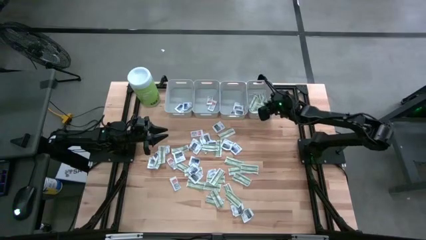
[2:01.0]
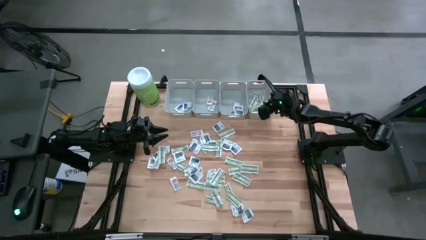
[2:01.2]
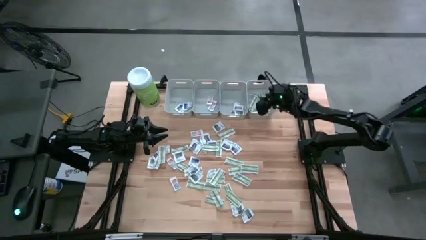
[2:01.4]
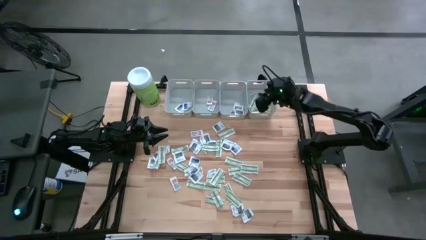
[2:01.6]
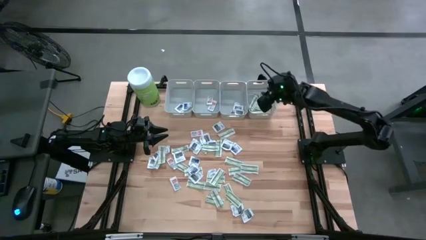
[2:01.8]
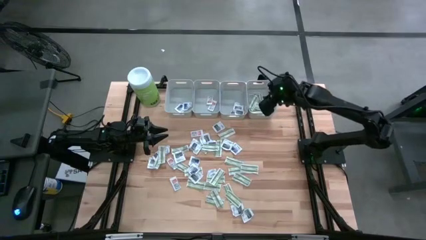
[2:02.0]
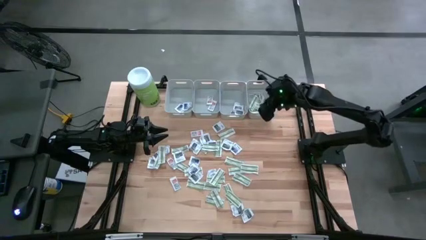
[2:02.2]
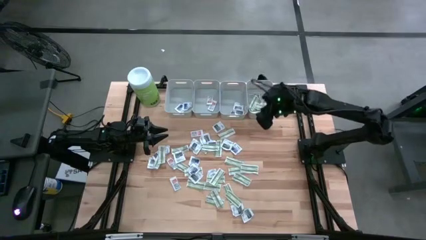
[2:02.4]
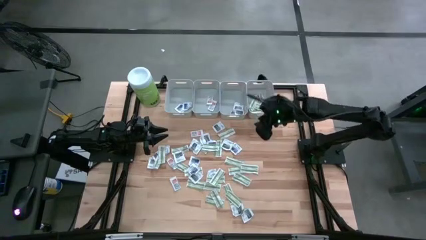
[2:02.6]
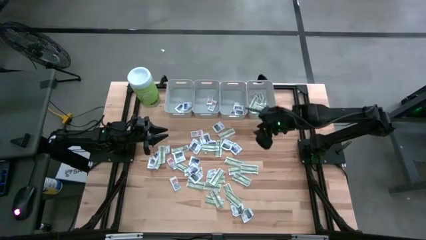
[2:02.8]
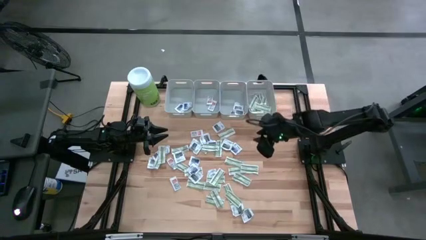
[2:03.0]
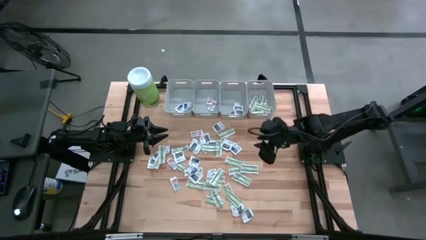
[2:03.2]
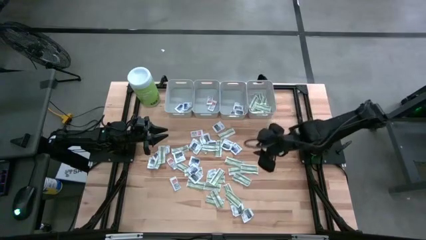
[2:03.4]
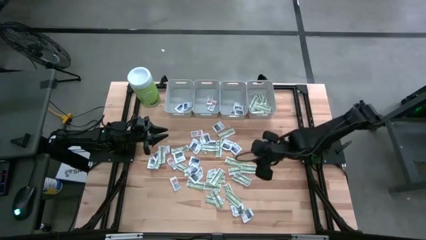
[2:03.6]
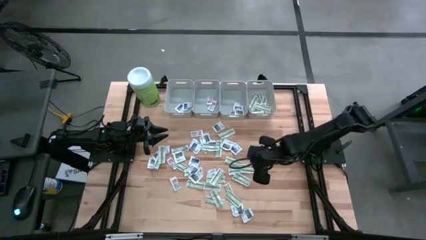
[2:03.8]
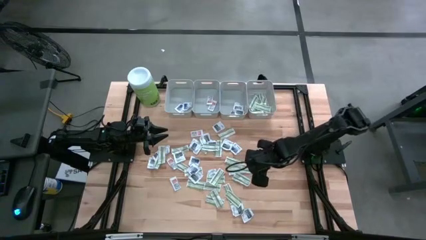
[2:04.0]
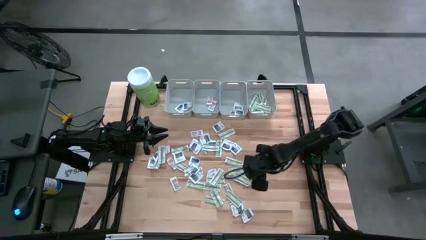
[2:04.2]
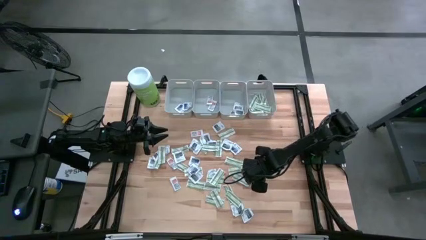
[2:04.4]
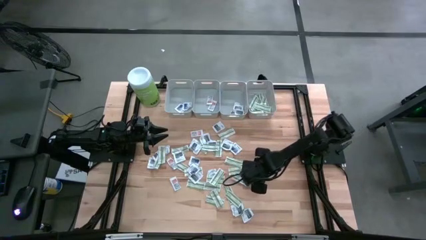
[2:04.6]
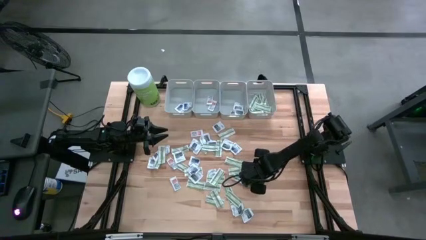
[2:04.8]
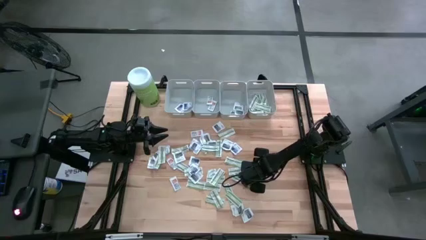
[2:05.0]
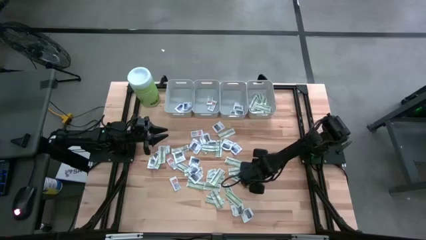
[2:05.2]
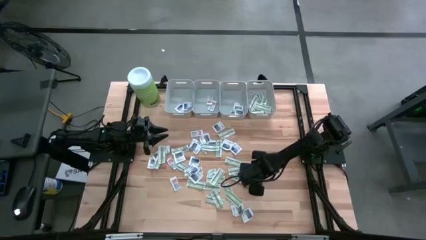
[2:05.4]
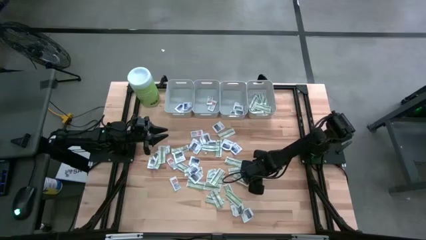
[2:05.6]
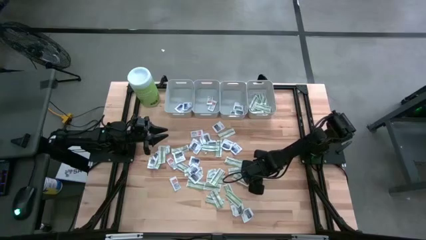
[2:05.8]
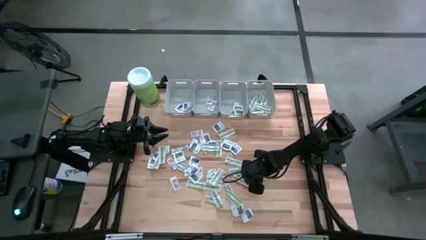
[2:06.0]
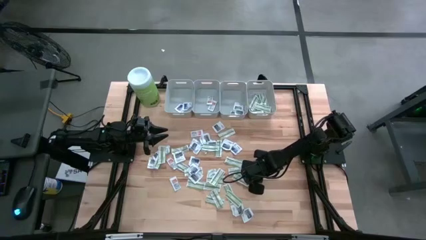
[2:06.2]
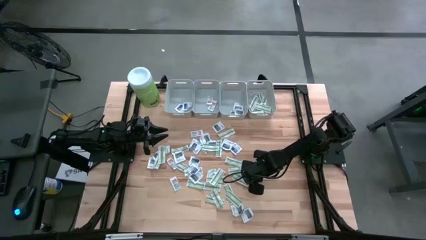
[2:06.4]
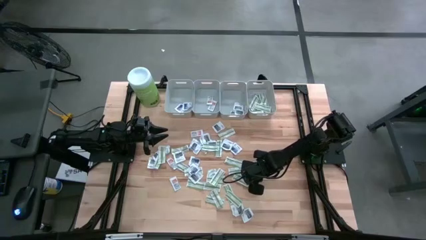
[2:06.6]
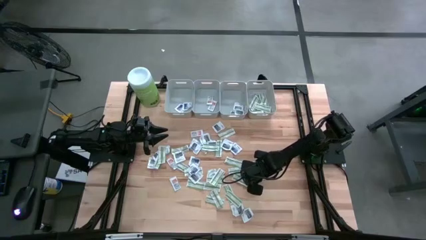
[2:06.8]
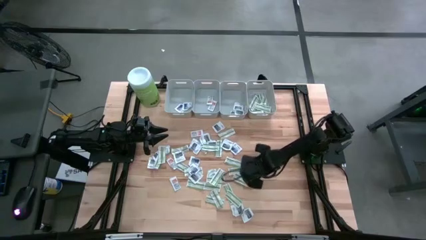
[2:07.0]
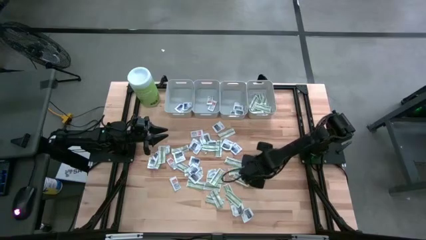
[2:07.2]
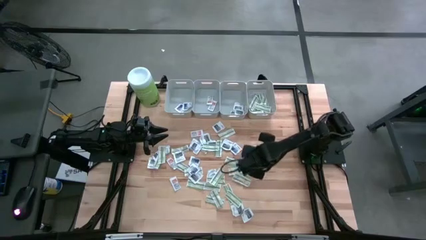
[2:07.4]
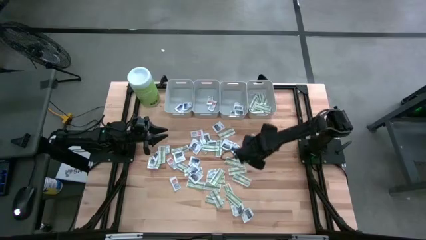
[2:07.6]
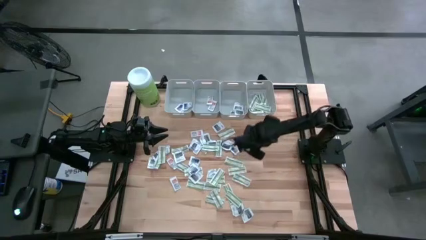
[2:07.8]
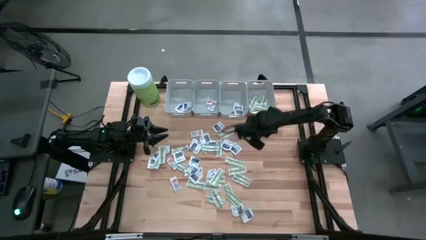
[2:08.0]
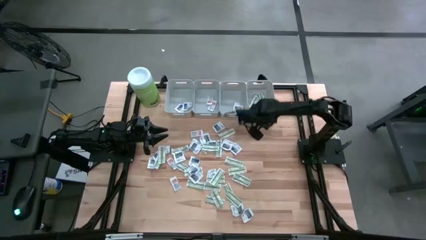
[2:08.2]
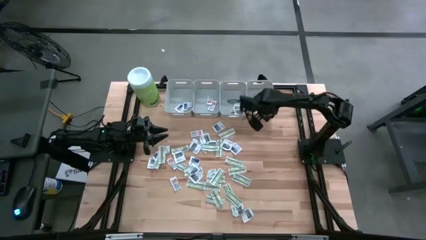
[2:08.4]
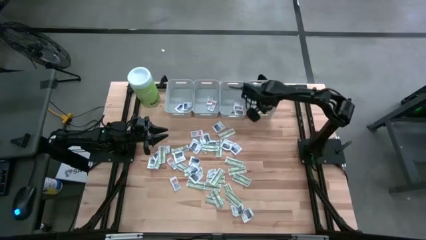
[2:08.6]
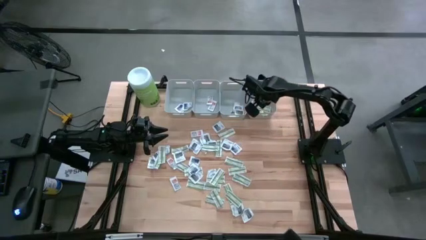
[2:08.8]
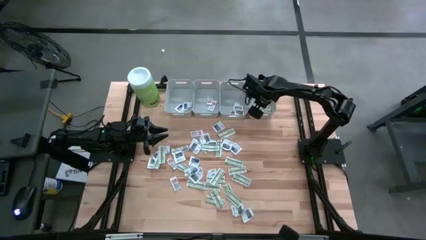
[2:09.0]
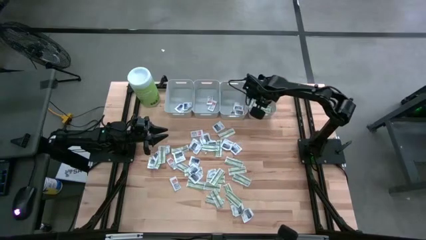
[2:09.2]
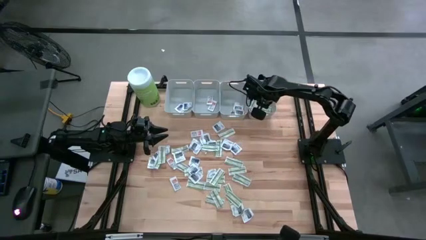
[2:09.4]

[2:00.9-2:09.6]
Task: Pick & Place First Aid Supplies
Put the bandage into the right gray bin

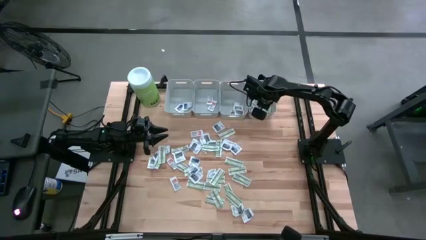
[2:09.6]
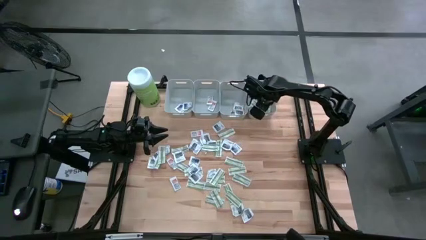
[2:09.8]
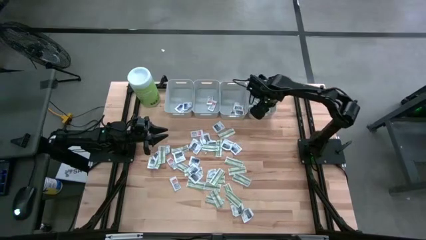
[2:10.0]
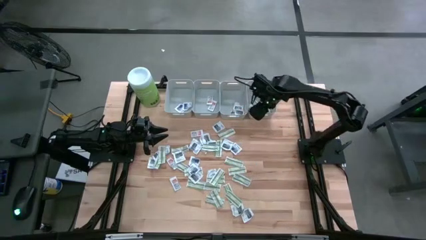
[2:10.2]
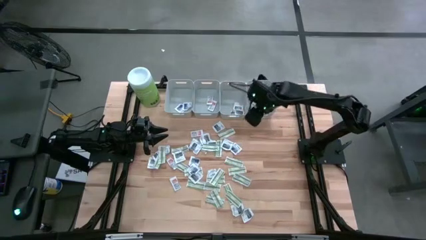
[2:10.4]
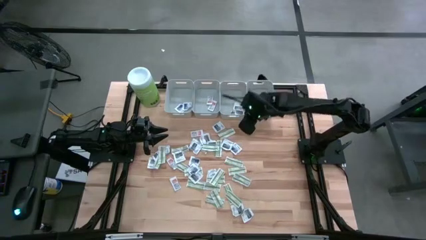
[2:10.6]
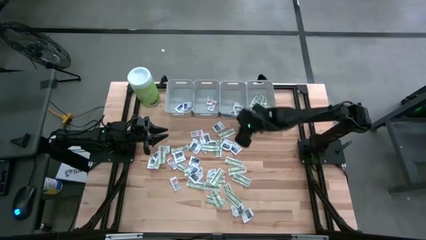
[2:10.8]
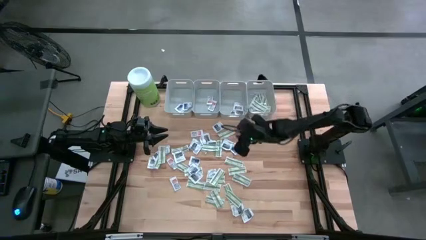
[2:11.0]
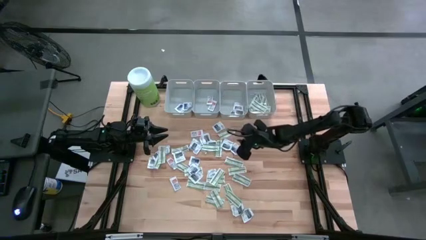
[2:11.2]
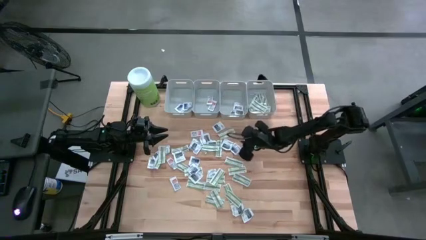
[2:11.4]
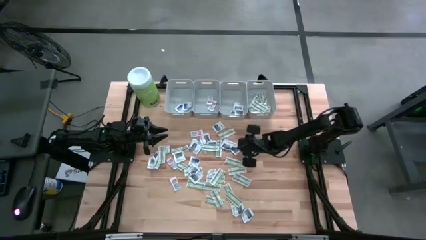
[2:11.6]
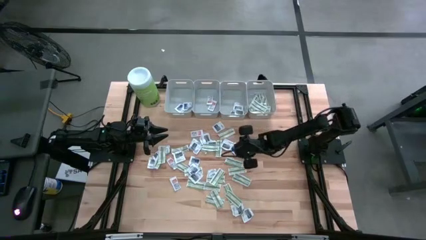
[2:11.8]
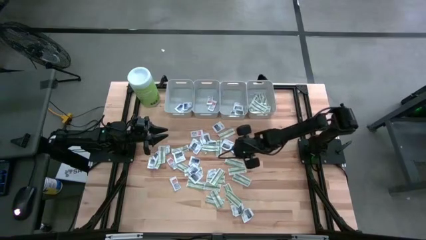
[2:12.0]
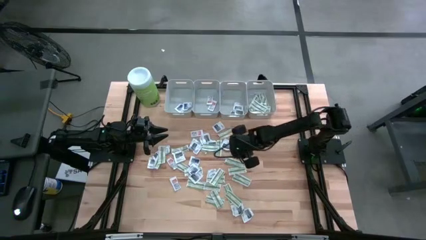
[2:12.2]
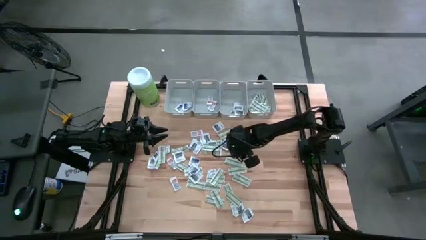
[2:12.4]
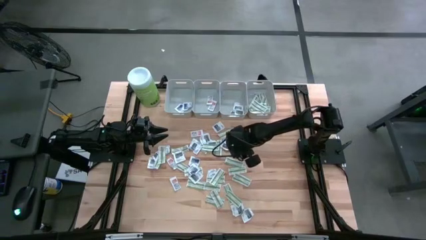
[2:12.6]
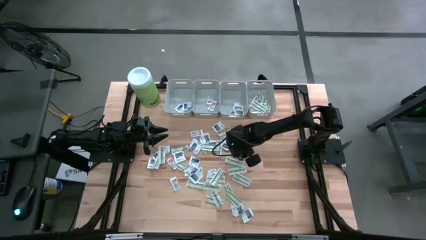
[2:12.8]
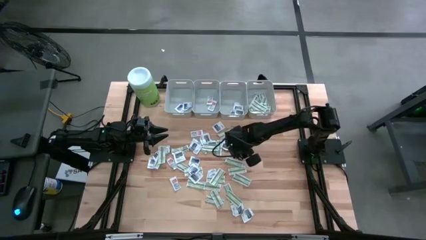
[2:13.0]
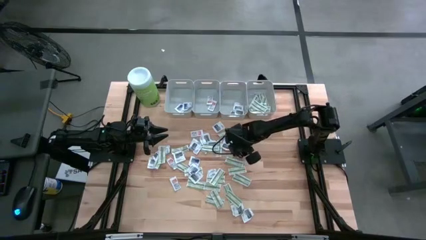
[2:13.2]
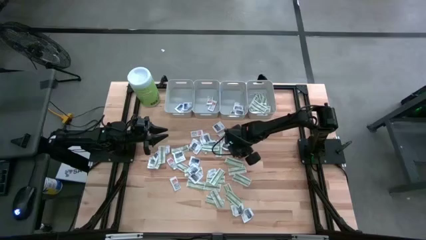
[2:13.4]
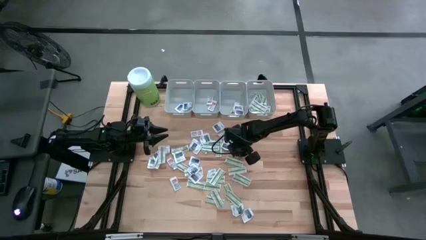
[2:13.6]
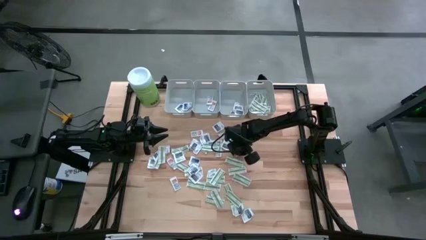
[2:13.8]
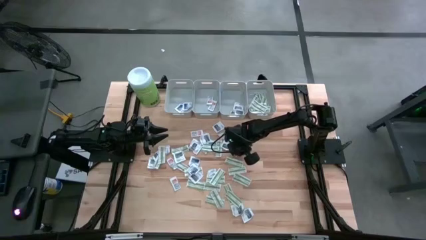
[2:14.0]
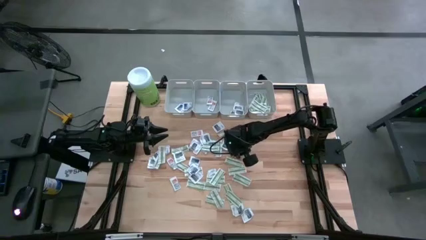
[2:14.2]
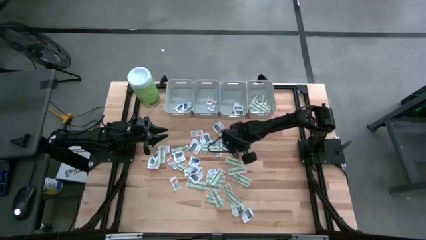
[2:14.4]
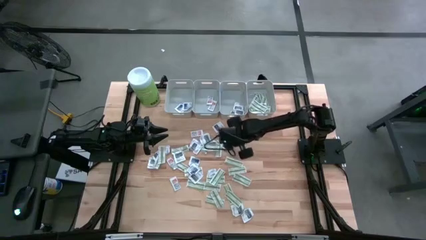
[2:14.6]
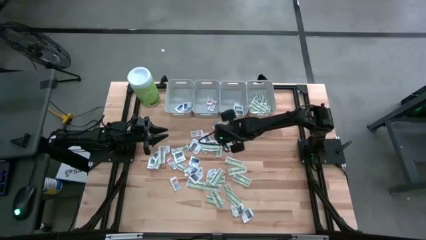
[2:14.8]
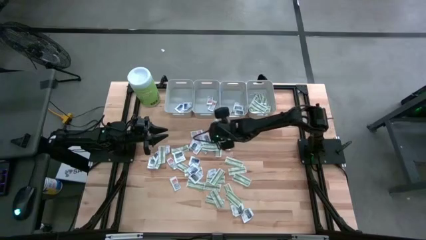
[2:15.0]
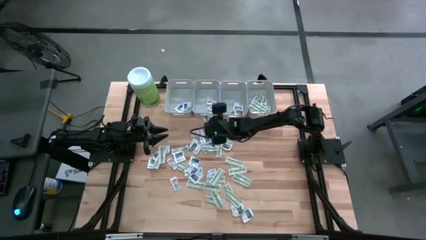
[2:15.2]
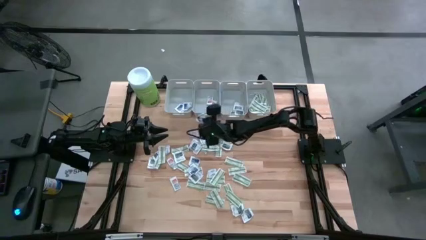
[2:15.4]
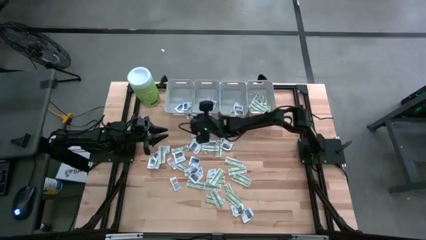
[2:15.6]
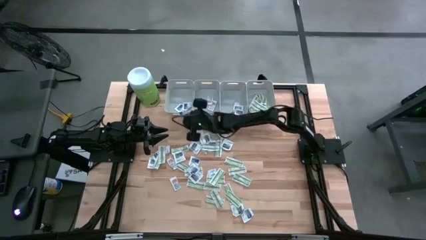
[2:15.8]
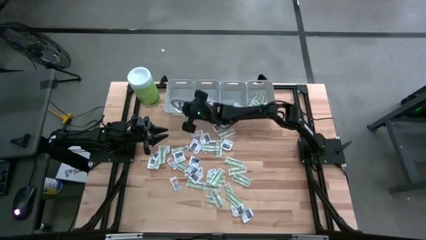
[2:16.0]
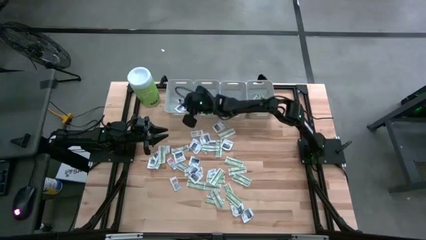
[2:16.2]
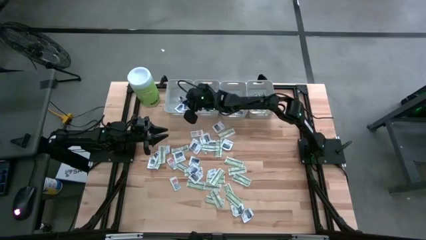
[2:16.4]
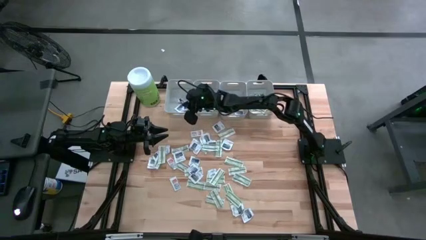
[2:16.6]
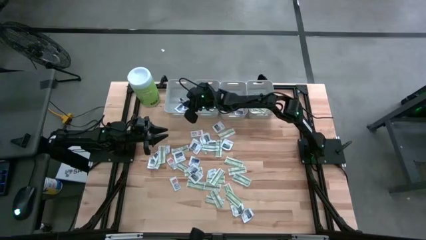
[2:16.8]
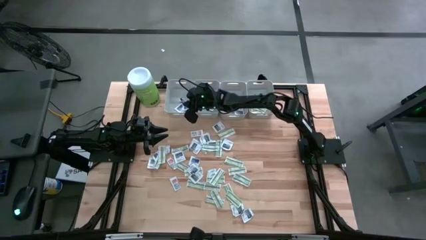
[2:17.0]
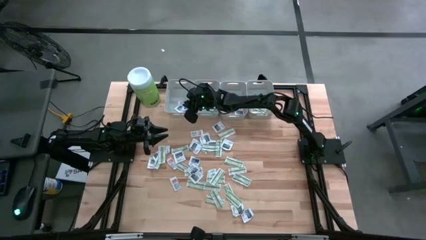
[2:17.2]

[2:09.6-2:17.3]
Put the alcohol pad into the left gray bin

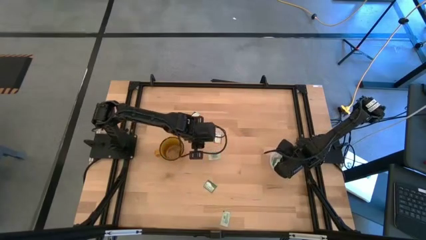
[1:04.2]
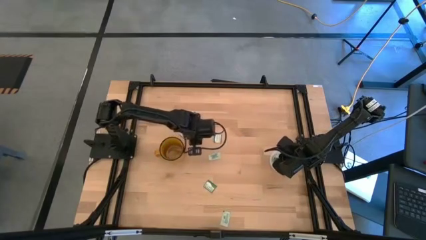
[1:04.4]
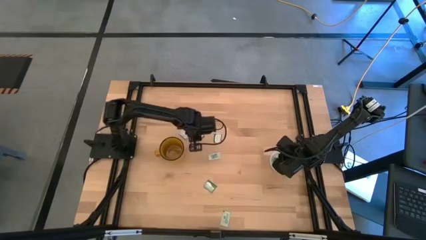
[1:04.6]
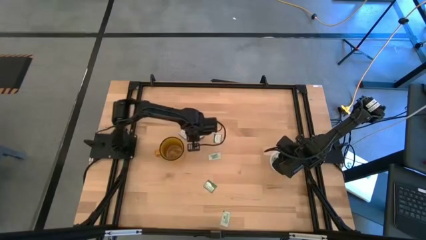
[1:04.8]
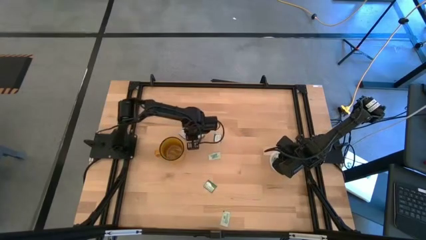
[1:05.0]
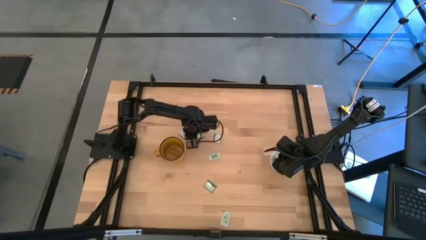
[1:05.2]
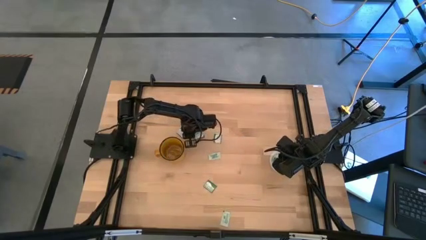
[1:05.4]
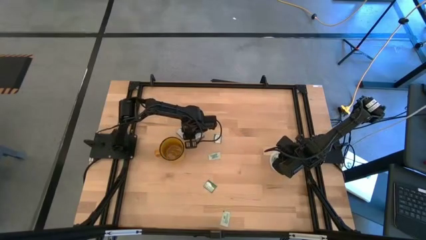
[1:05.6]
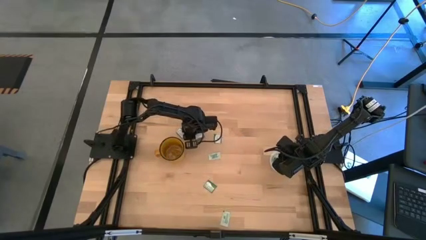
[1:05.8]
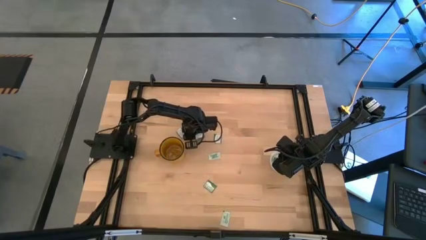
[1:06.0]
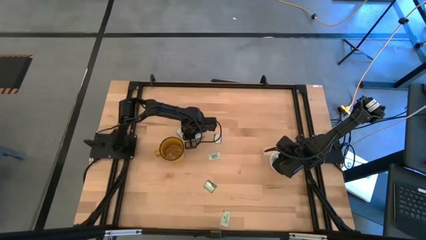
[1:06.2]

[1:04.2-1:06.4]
Task: Pick and place Stevia / Truvia into bins
Put the green stevia packet into the transparent container
